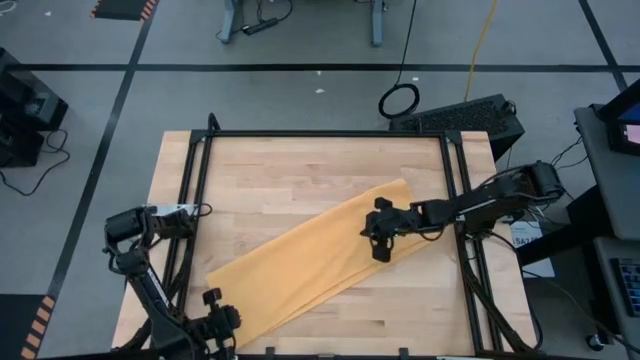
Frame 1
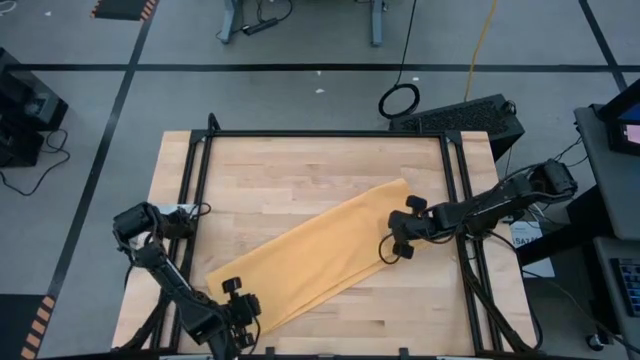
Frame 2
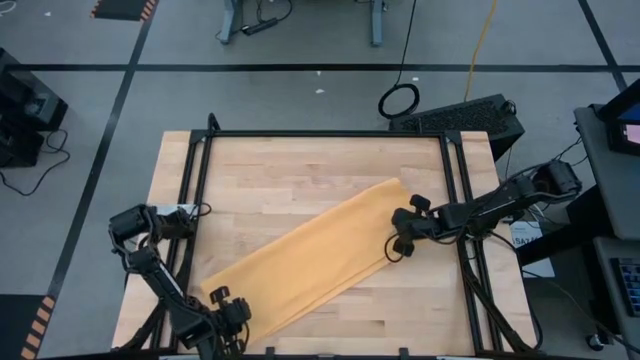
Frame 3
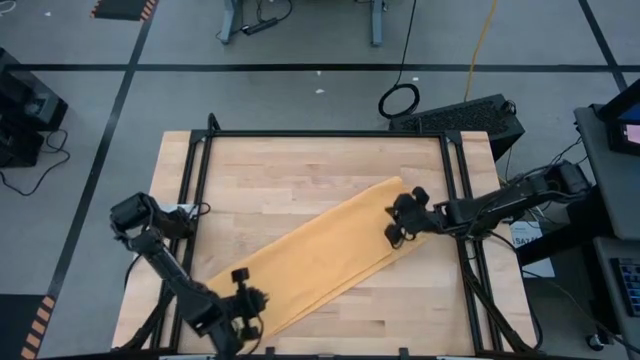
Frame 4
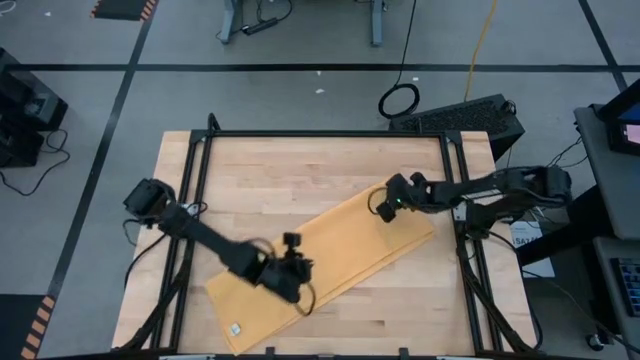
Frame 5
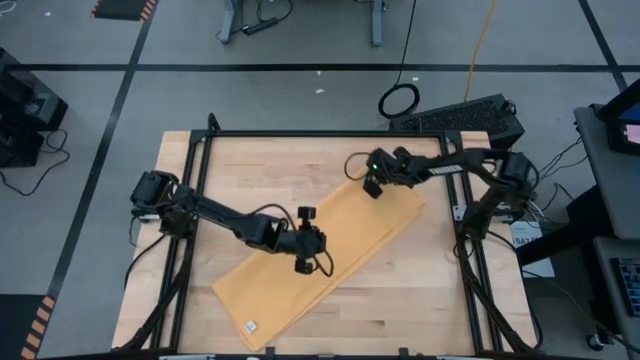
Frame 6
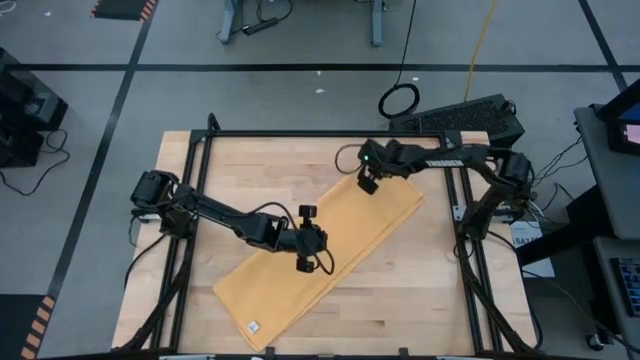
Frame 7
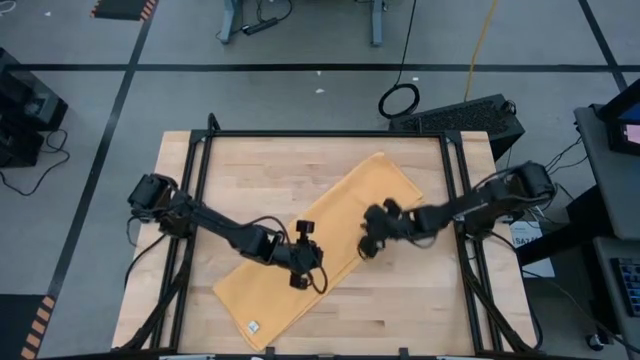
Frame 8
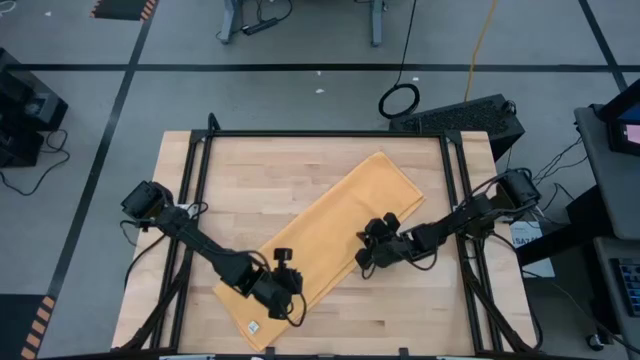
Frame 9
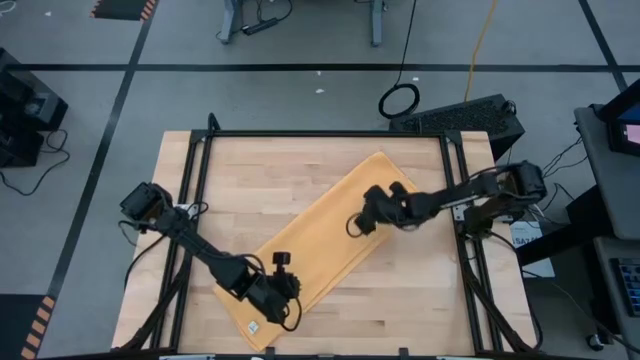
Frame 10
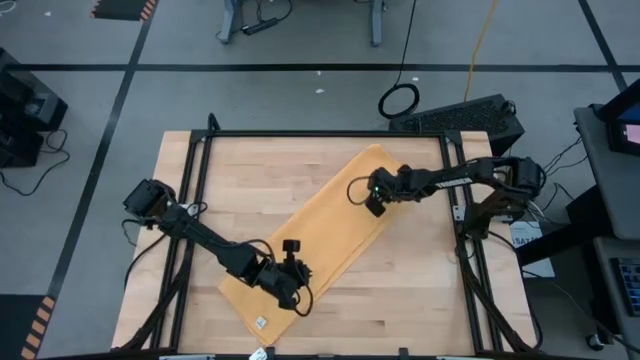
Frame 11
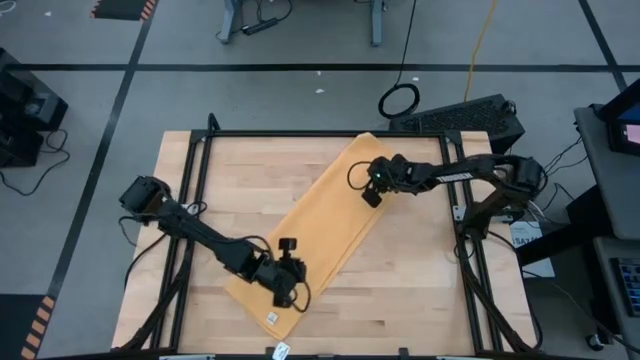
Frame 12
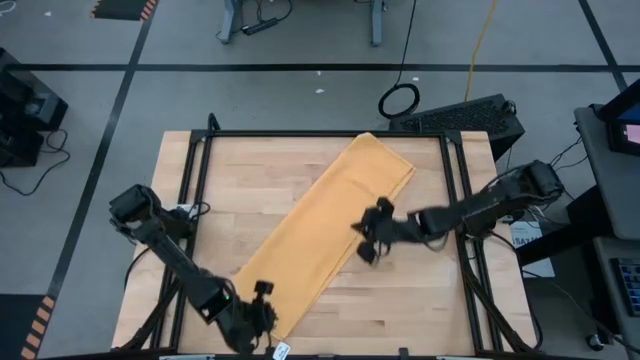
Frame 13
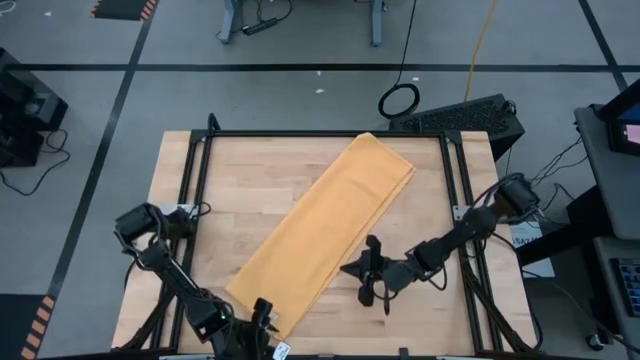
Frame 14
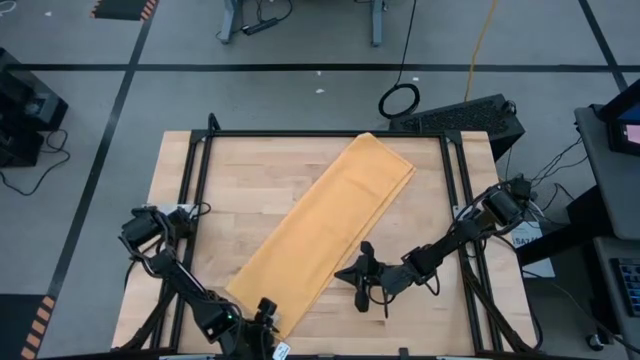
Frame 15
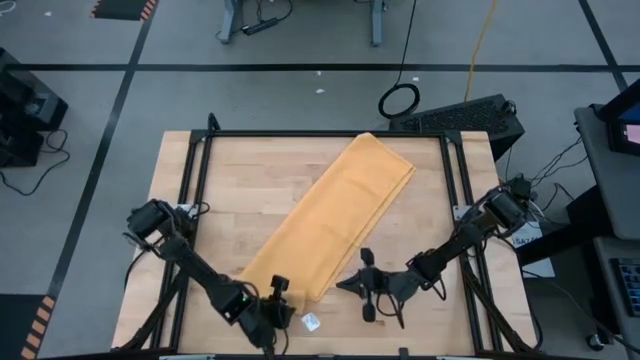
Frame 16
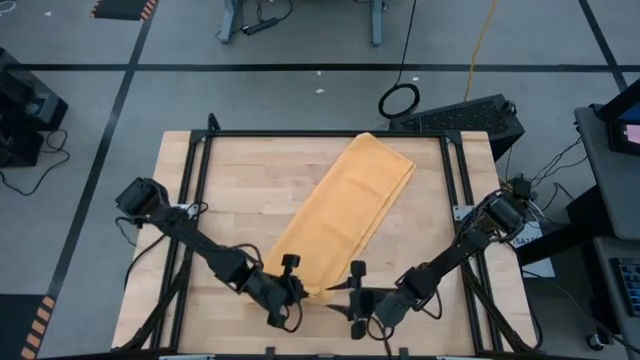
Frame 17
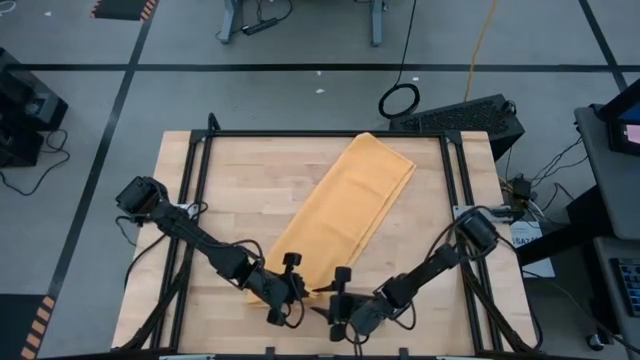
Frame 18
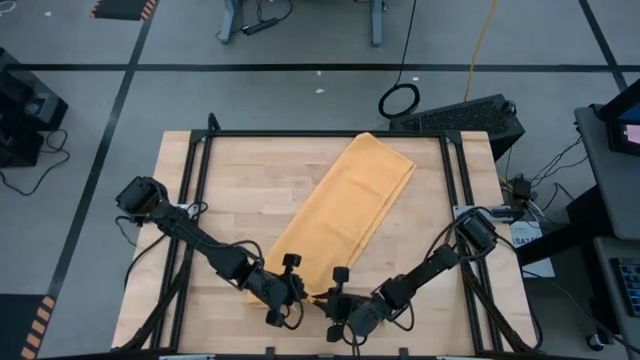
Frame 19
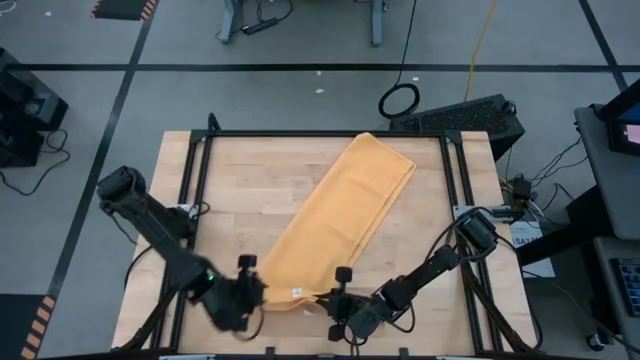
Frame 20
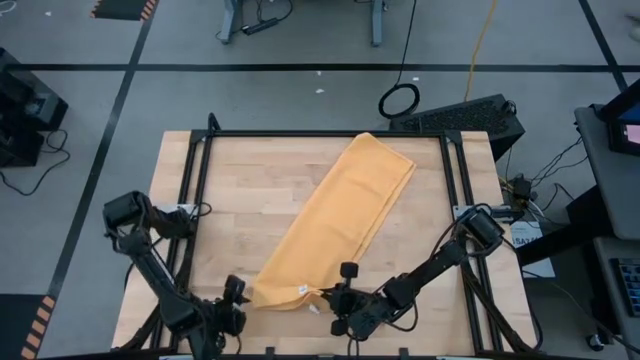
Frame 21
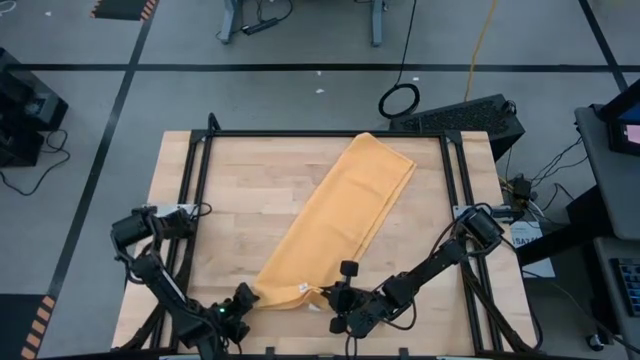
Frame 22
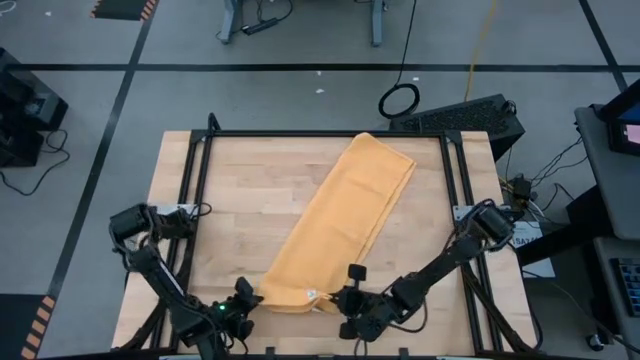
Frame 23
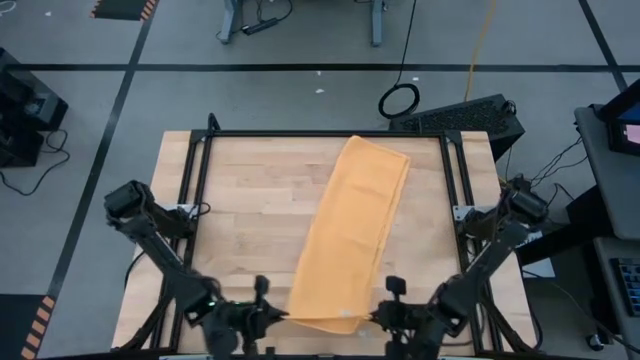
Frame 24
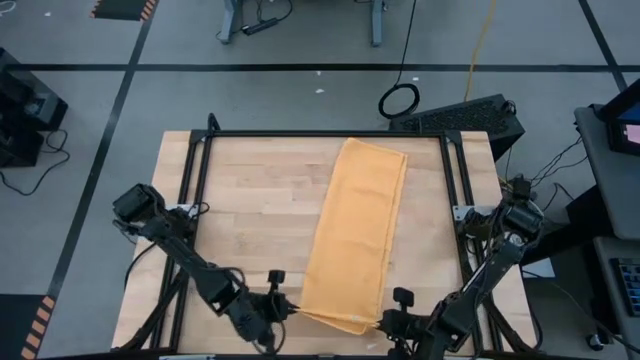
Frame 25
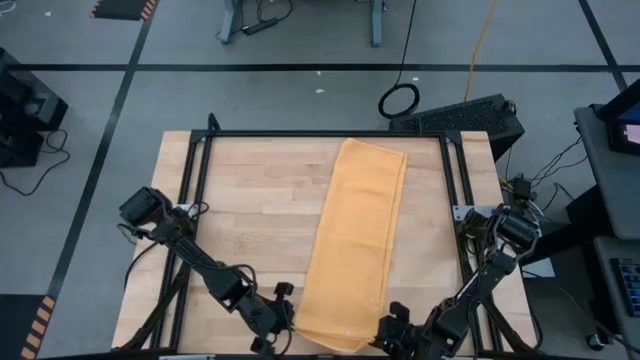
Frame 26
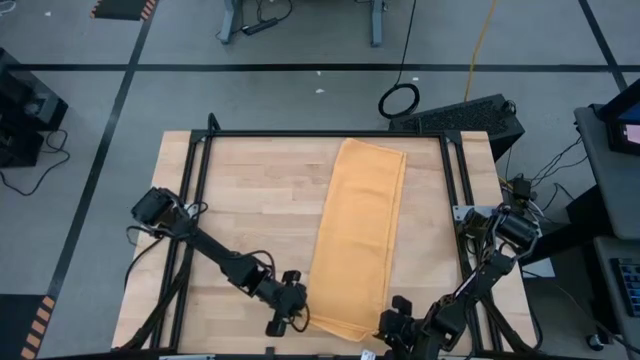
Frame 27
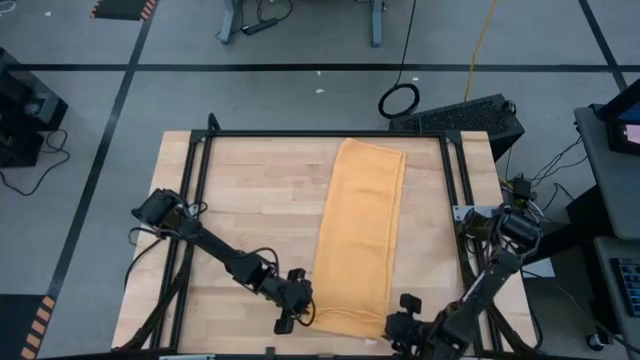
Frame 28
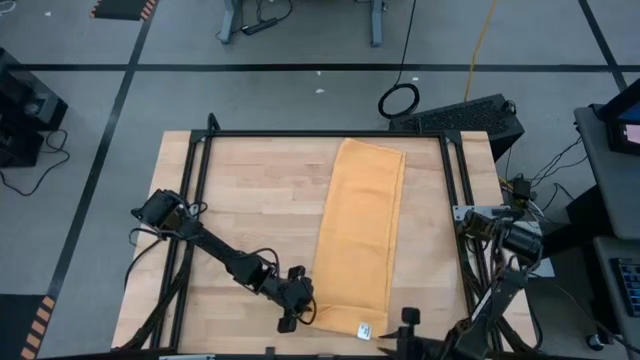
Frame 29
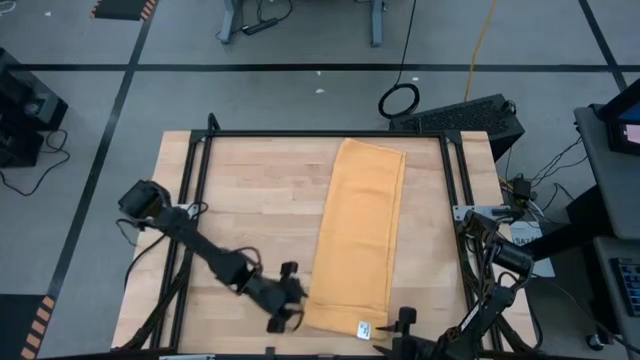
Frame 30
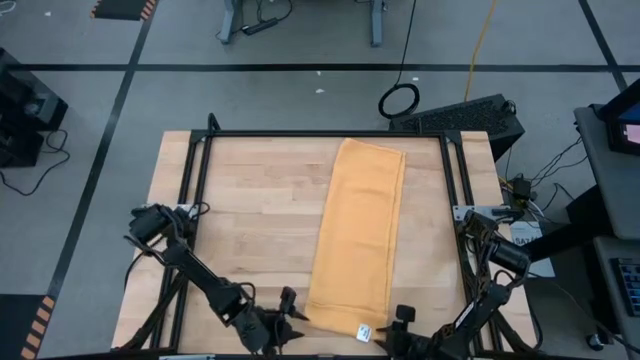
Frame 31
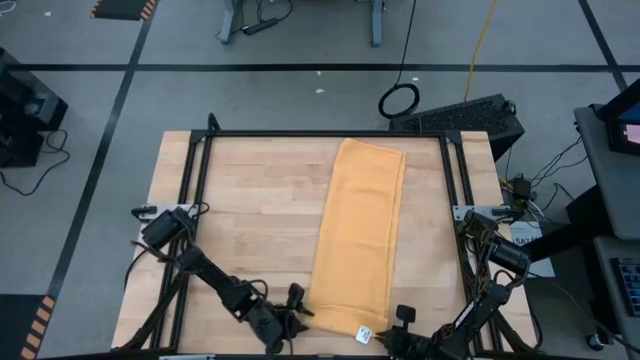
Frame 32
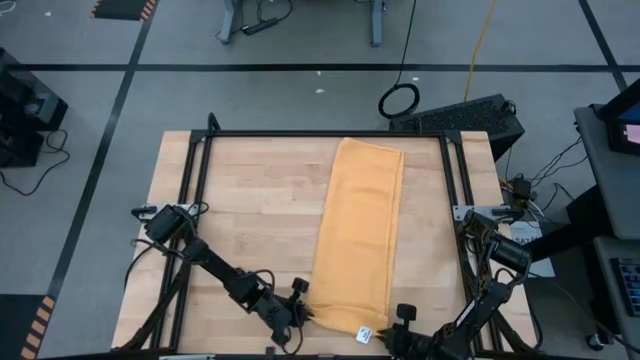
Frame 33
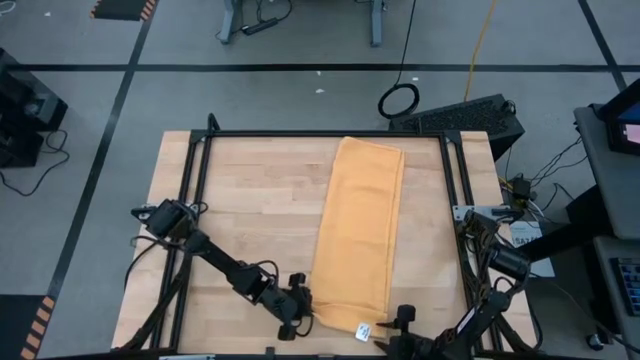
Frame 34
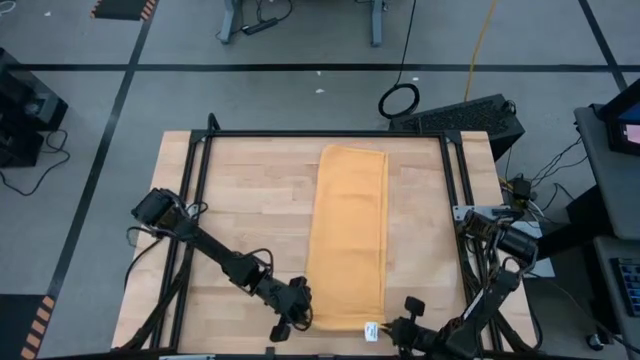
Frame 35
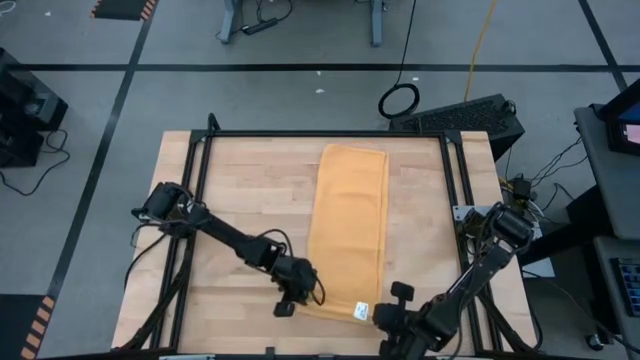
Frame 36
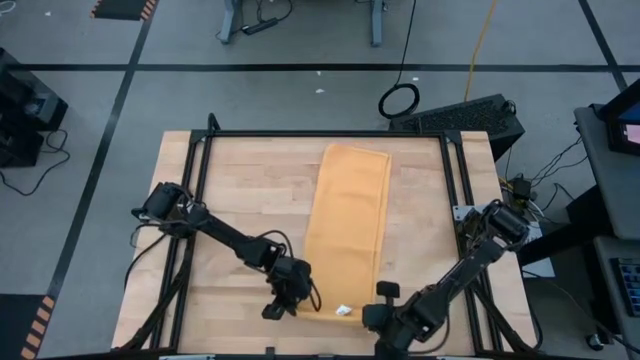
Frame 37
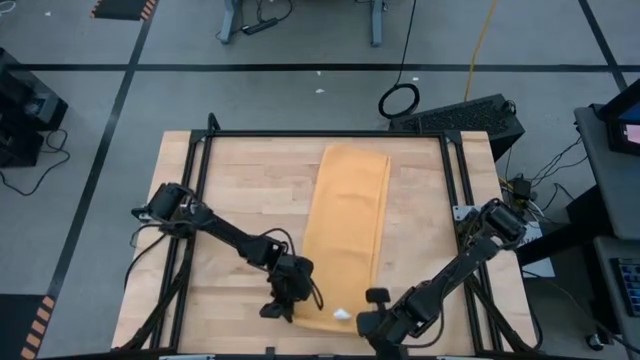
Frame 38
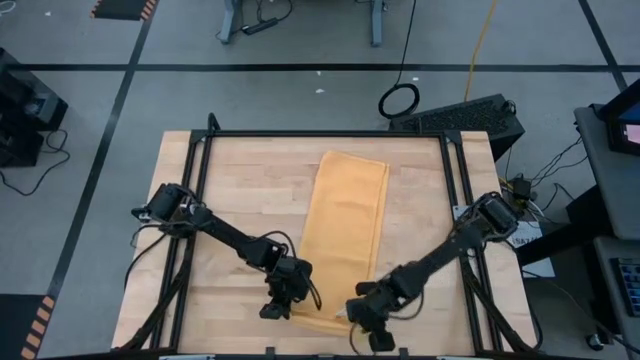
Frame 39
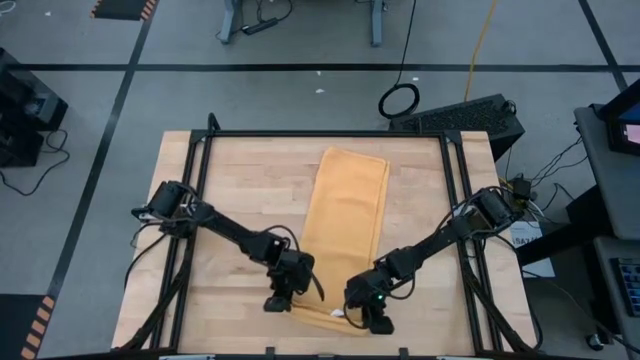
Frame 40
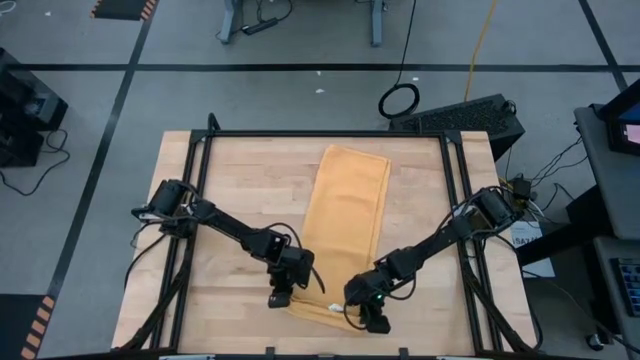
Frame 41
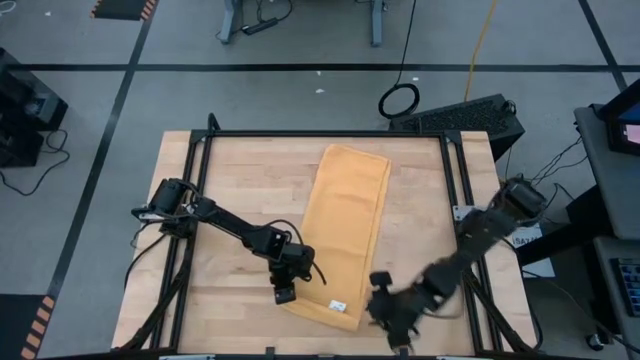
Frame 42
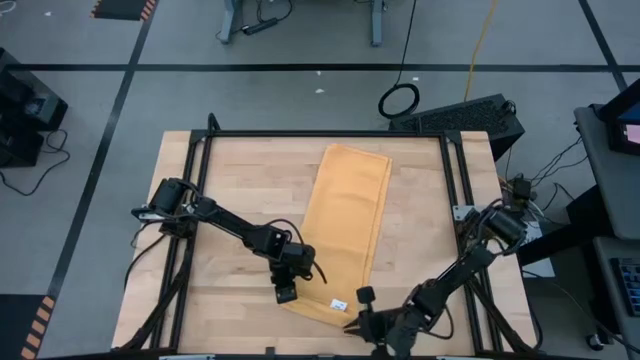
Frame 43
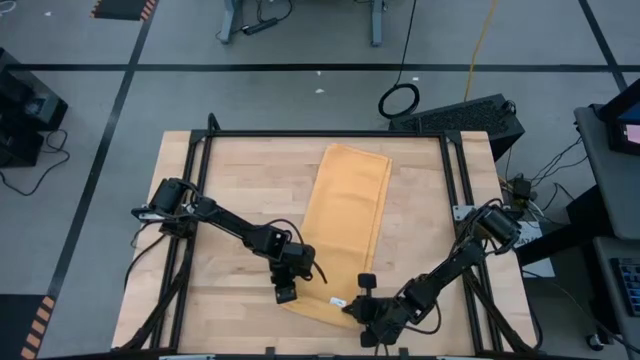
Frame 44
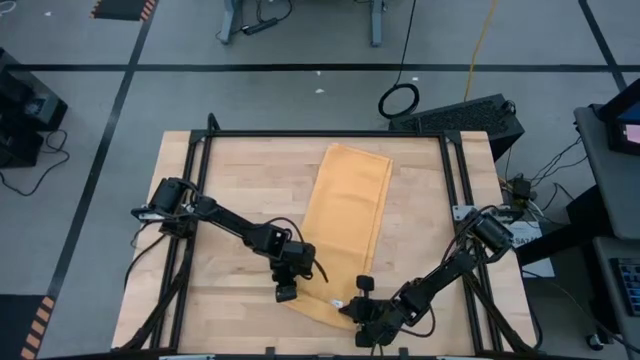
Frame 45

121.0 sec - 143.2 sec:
Task: Roll towel
Roll the yellow towel
